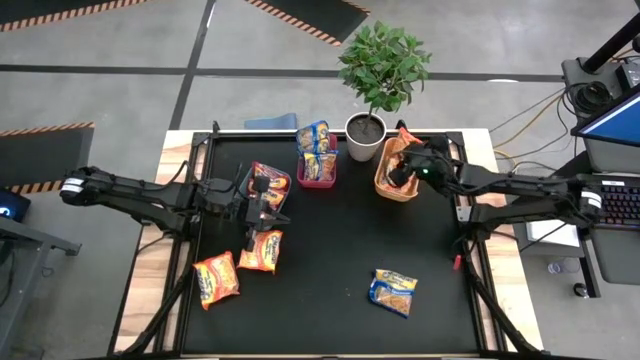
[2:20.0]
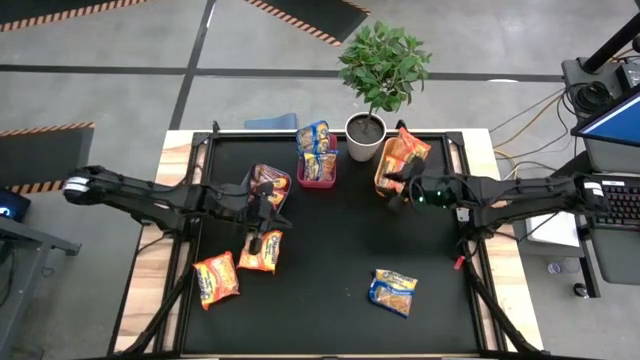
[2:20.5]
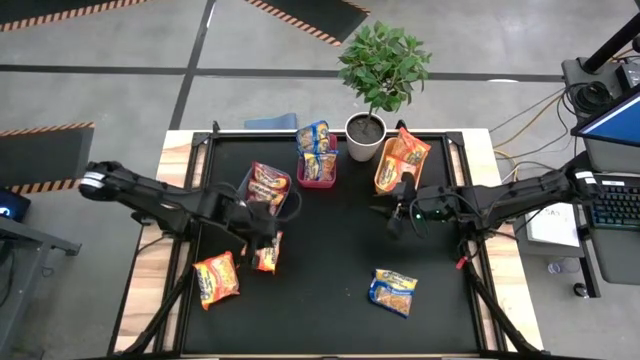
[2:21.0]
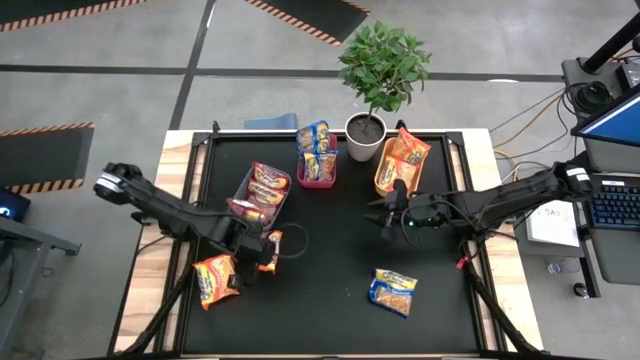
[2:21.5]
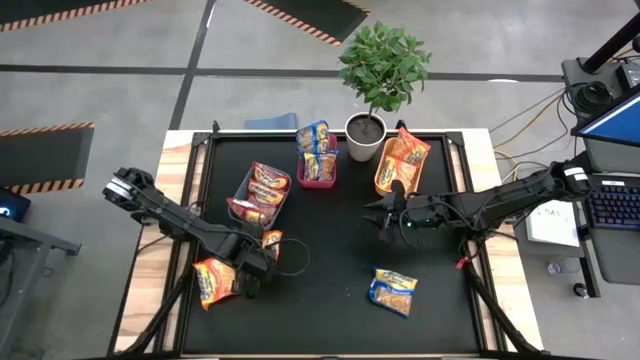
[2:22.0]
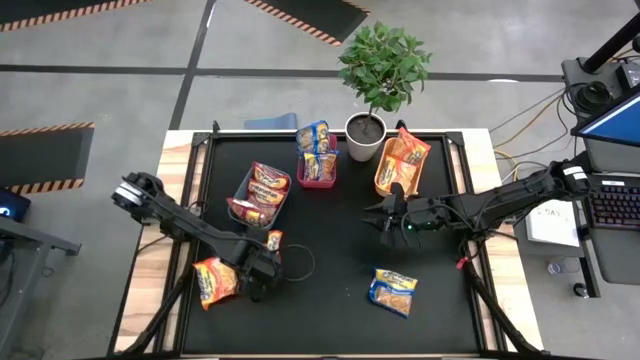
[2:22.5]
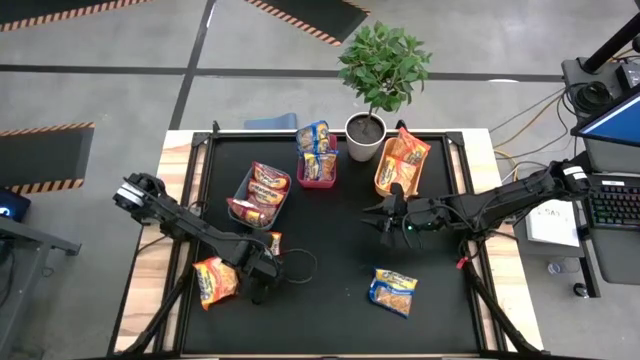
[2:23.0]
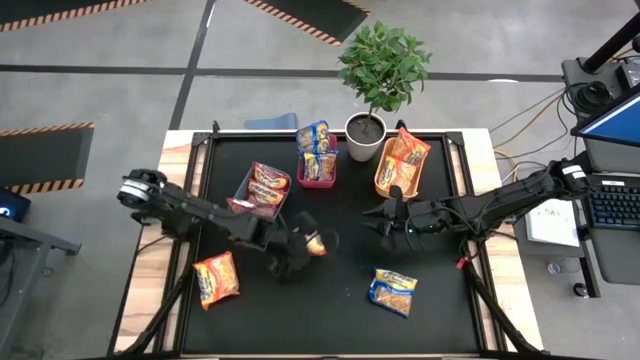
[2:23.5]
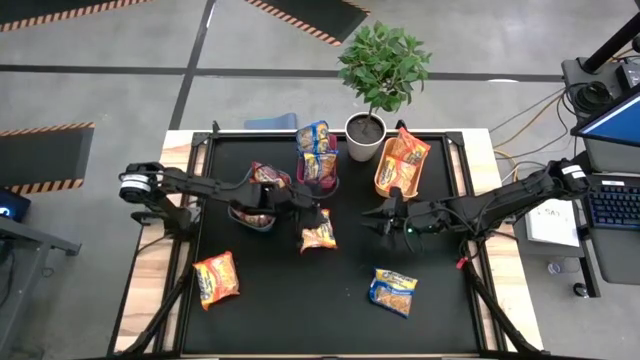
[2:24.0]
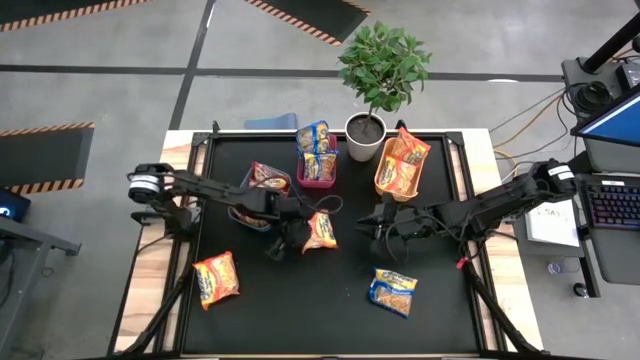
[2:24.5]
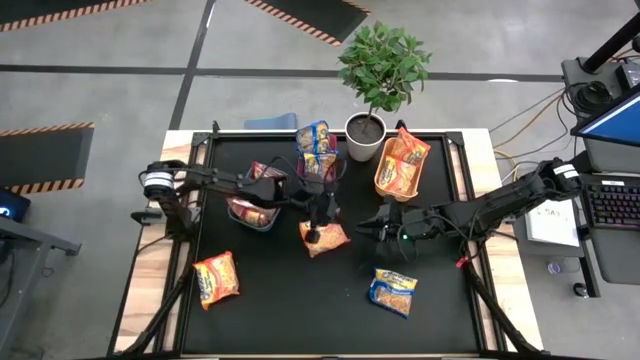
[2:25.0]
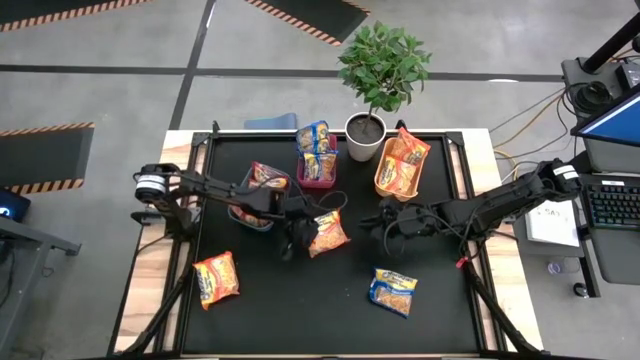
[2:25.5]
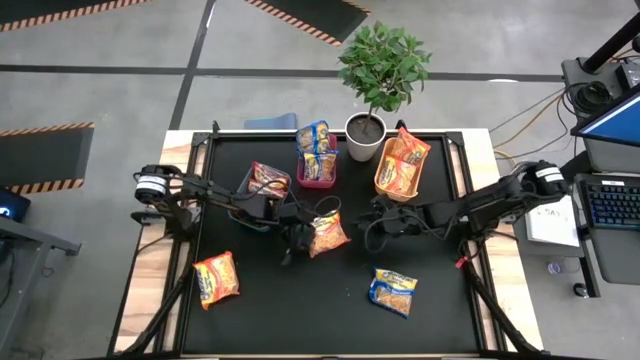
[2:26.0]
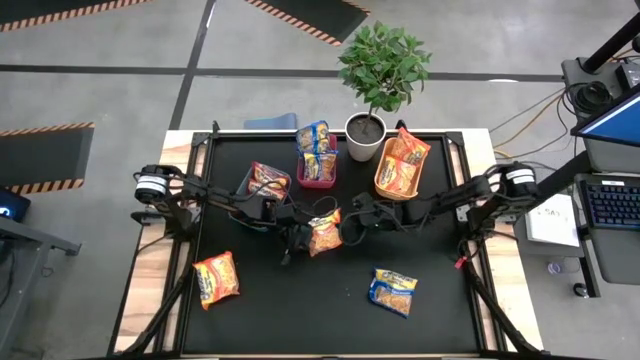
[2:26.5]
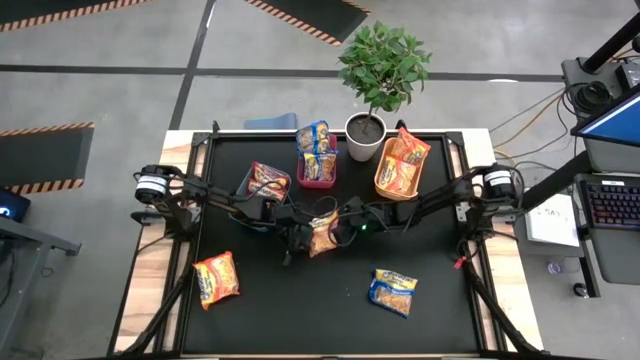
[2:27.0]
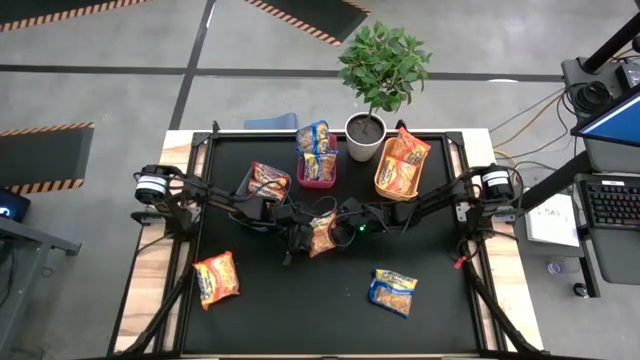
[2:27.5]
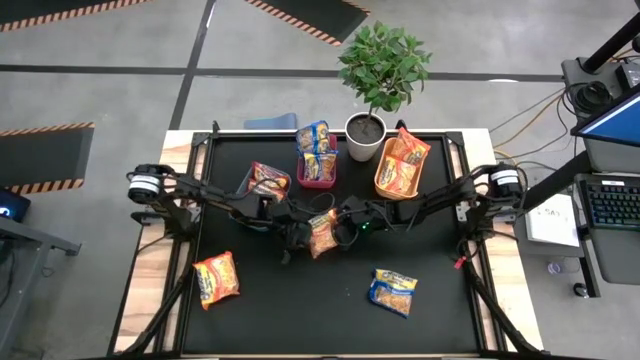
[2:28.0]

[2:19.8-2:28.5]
Task: Sort Maruchan noodles
Put the right orange noodle pack into the yellow bin

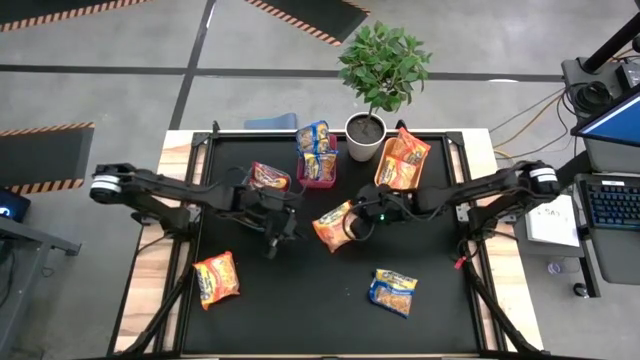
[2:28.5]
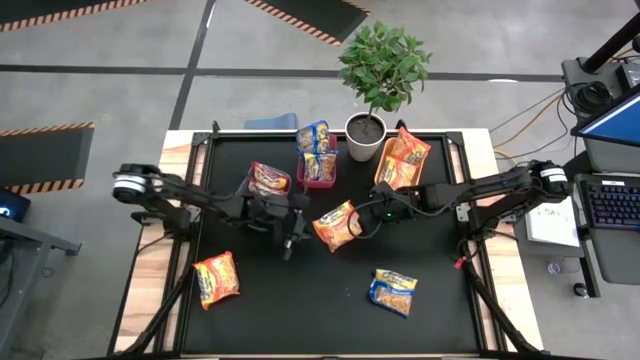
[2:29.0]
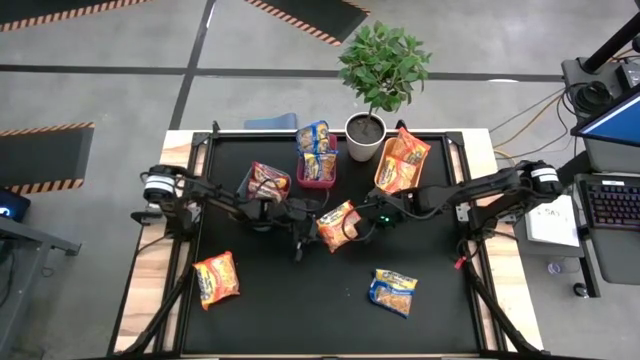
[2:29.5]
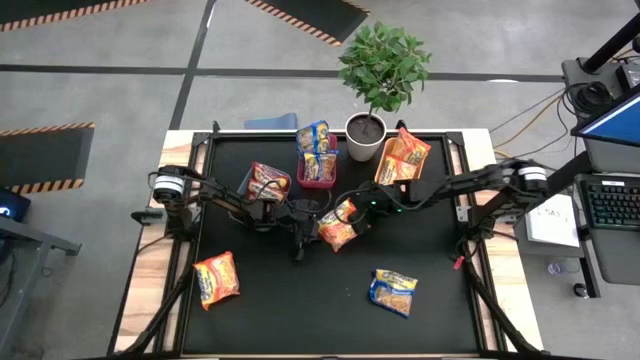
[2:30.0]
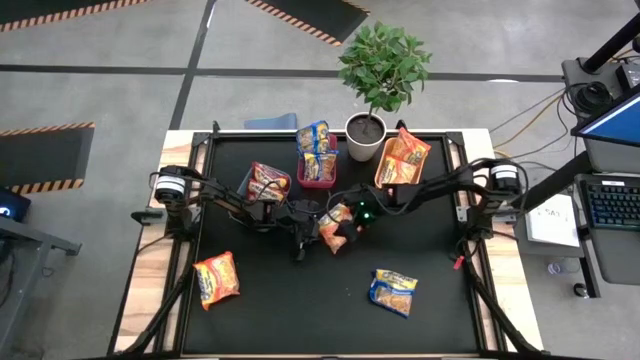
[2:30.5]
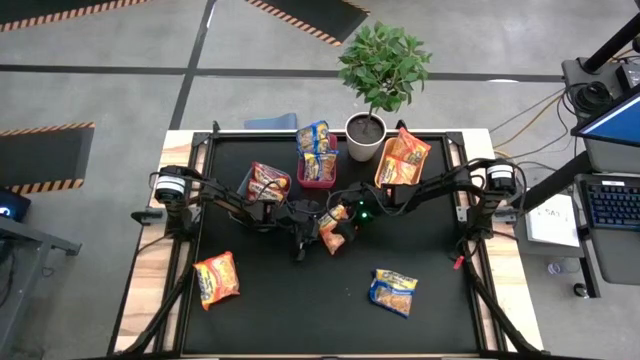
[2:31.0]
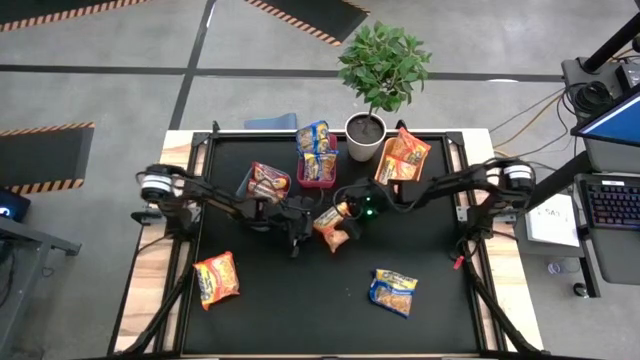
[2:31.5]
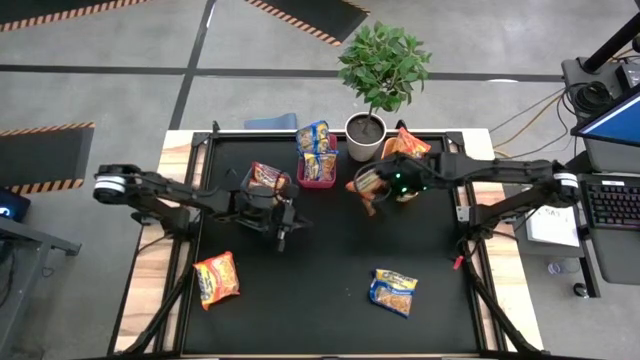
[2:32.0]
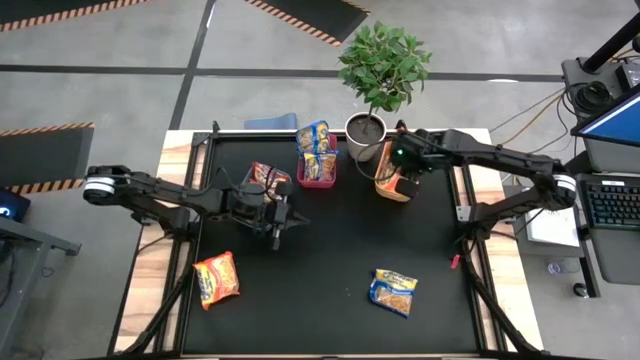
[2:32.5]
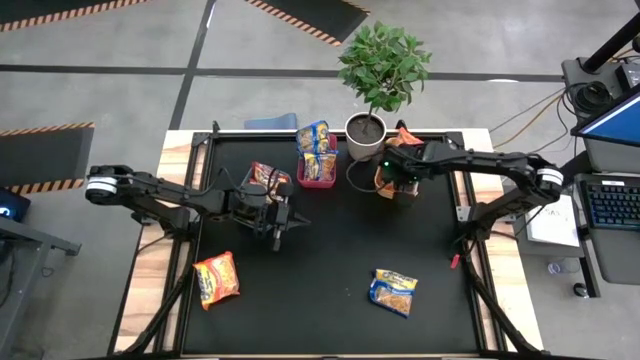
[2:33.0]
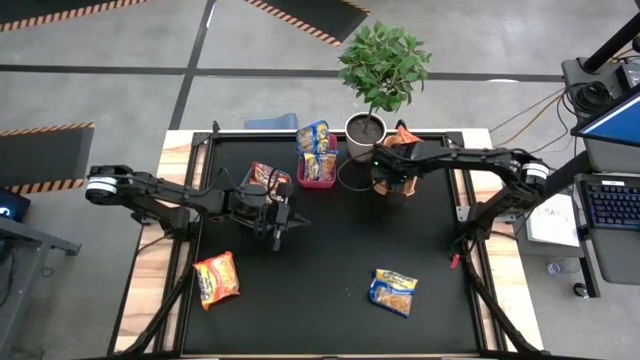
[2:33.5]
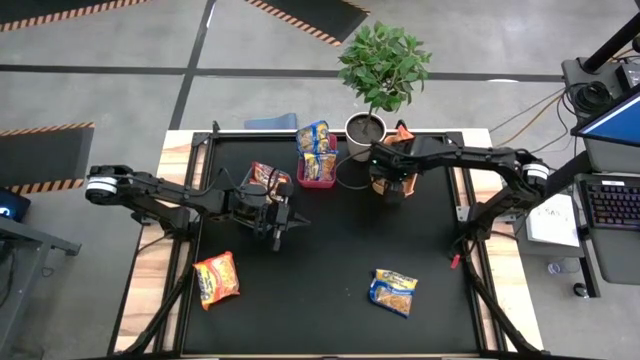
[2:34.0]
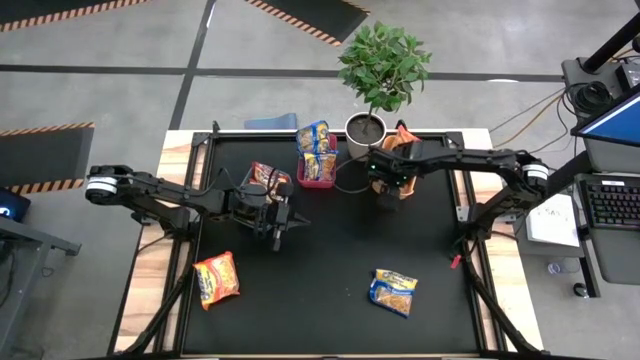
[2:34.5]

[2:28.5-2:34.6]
Put the right orange noodle pack into the yellow bin

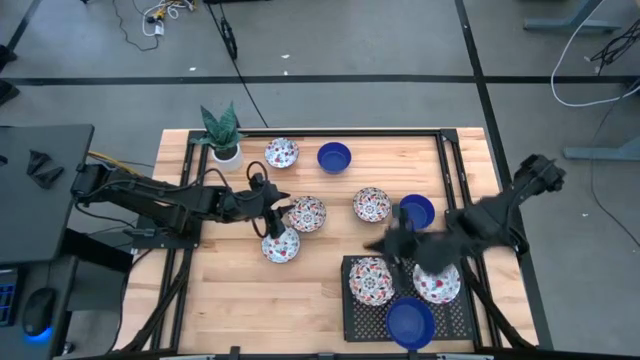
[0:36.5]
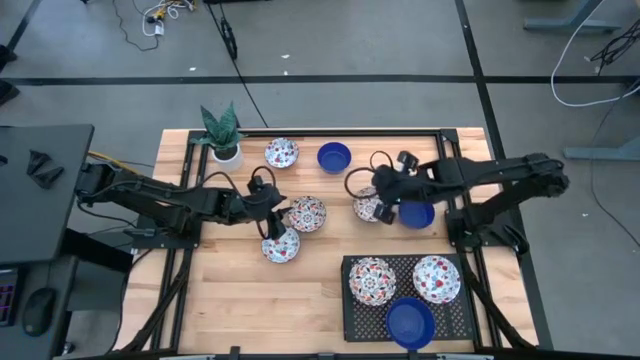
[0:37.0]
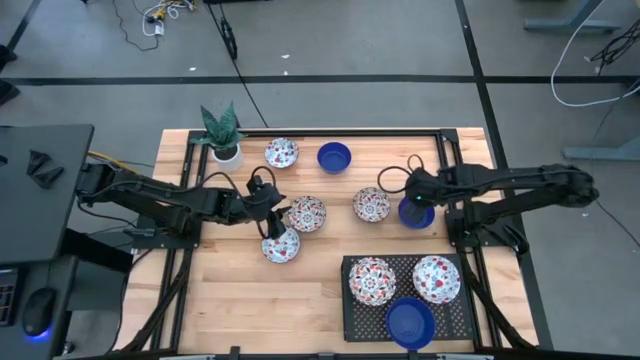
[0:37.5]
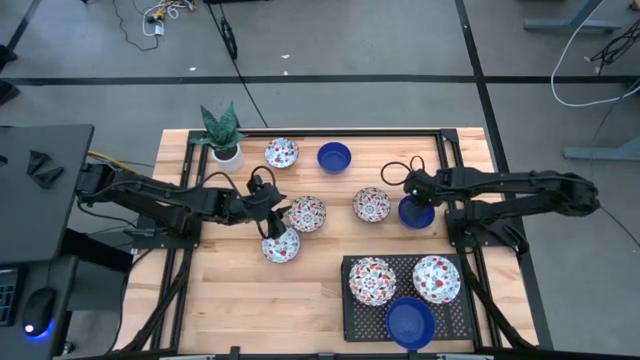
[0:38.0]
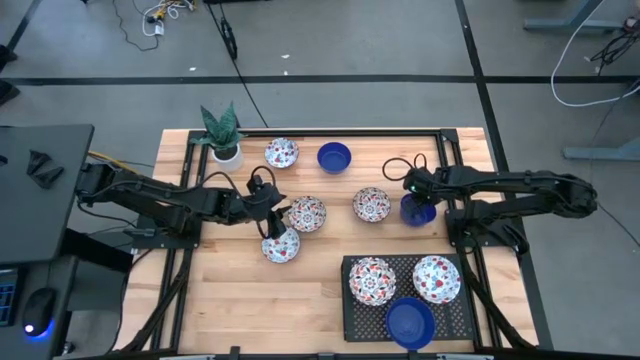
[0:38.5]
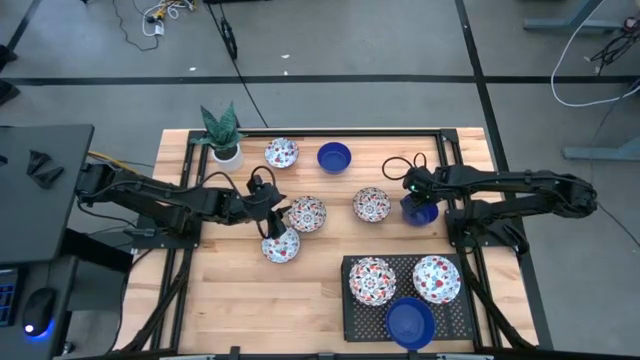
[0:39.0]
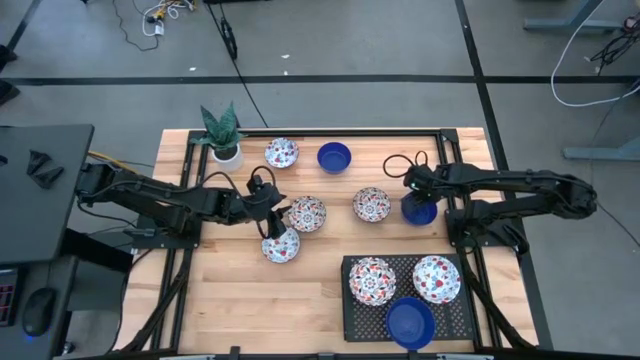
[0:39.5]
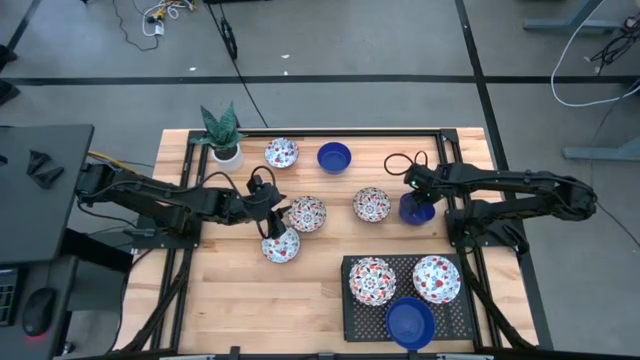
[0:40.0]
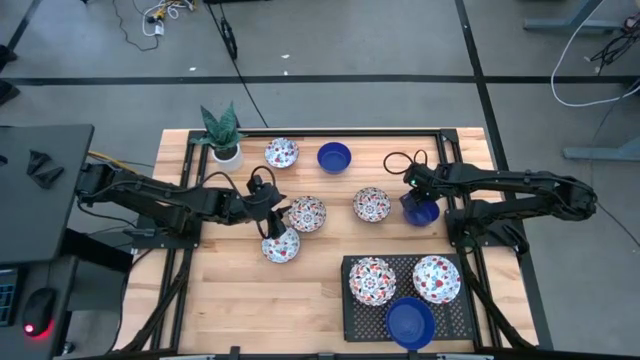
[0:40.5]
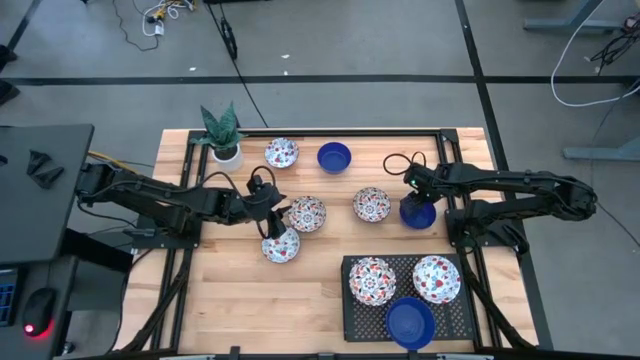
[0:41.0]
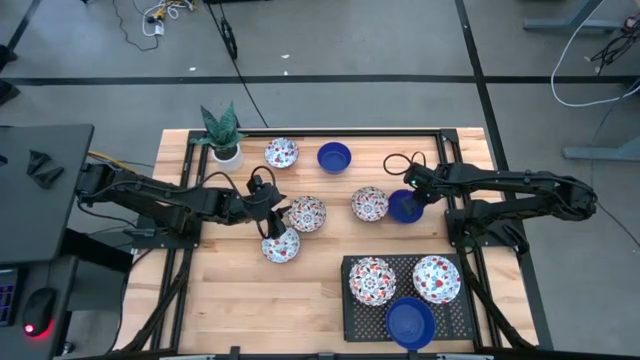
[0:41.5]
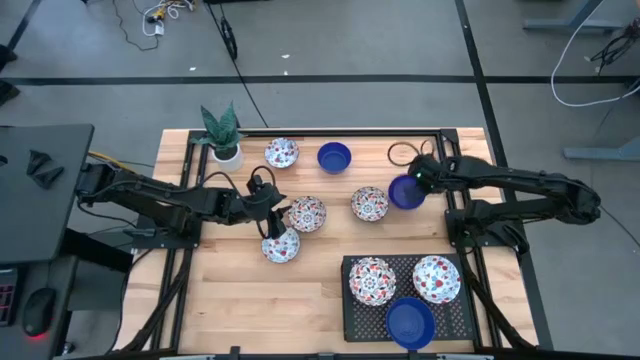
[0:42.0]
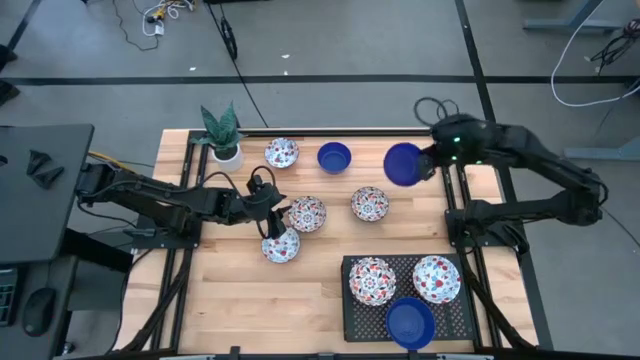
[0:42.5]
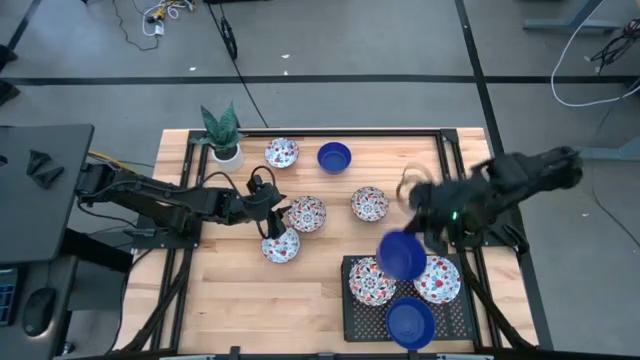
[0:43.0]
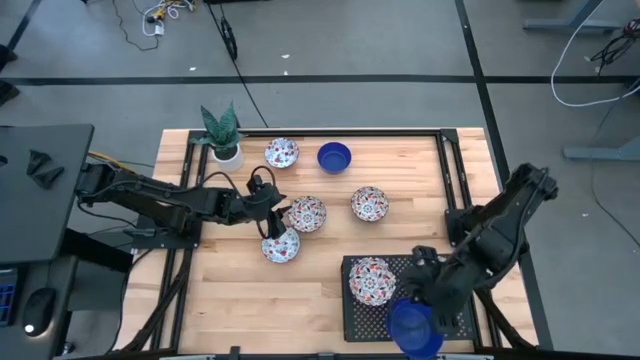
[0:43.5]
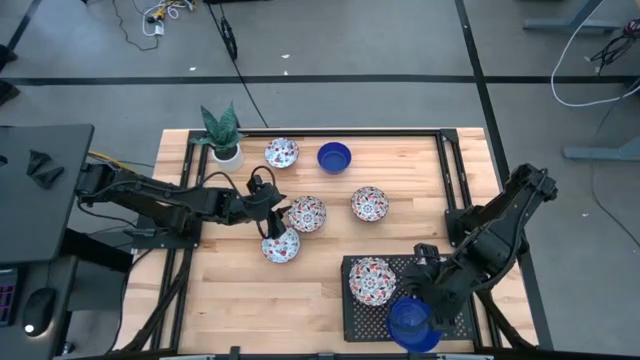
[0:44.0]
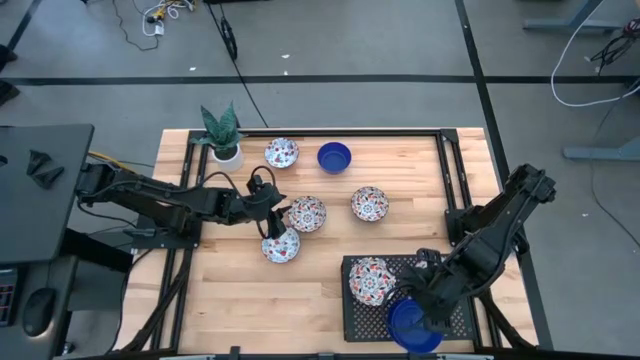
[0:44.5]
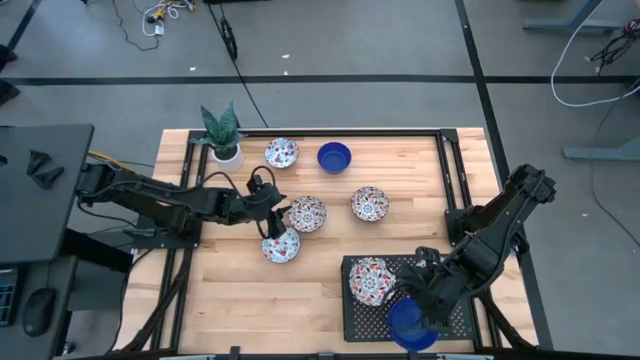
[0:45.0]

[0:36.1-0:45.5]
Task: Pick & Place Mini bowls
Stack the bottom blue bowl on top of the blue bowl on the shelf
